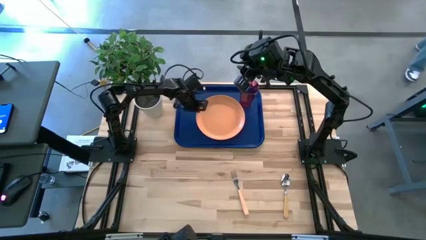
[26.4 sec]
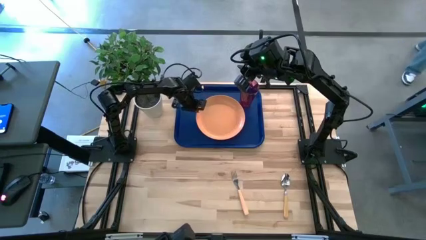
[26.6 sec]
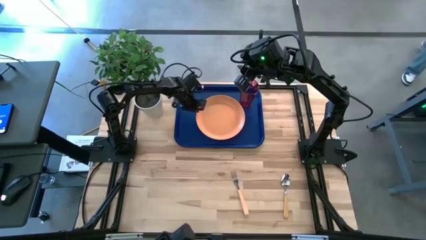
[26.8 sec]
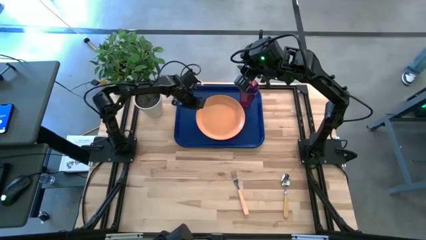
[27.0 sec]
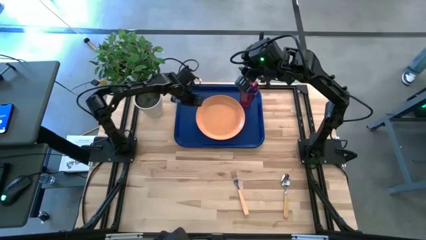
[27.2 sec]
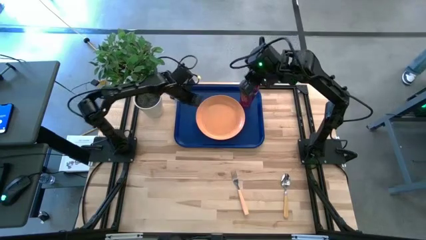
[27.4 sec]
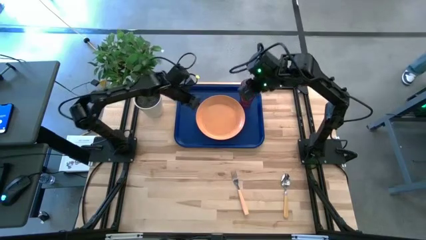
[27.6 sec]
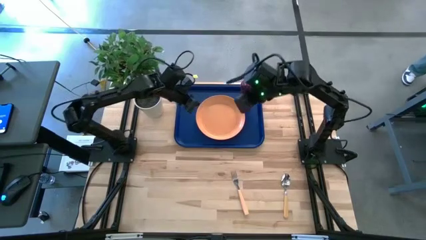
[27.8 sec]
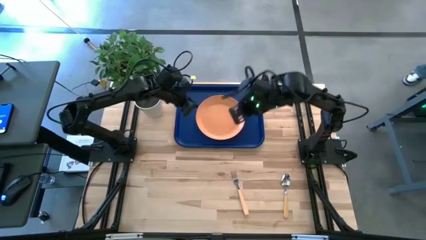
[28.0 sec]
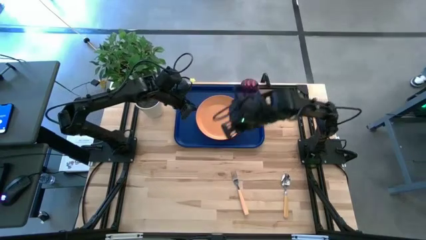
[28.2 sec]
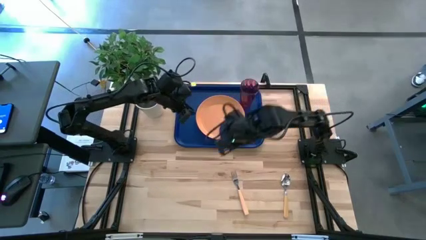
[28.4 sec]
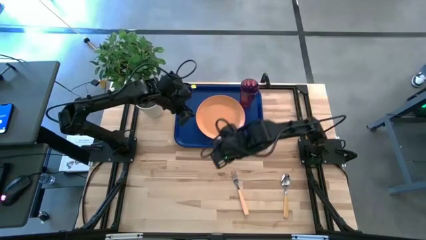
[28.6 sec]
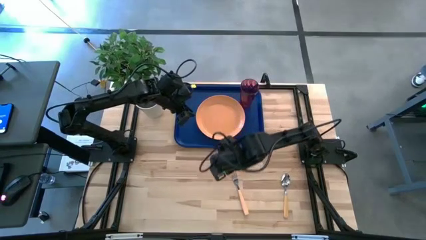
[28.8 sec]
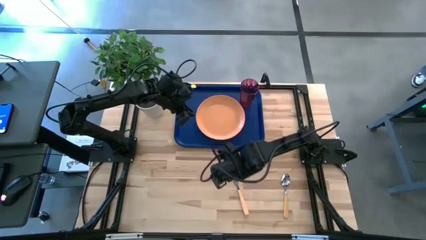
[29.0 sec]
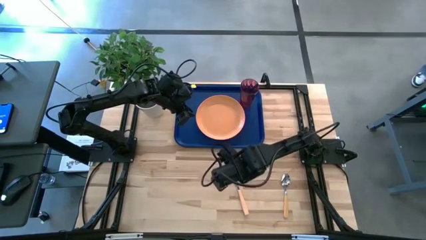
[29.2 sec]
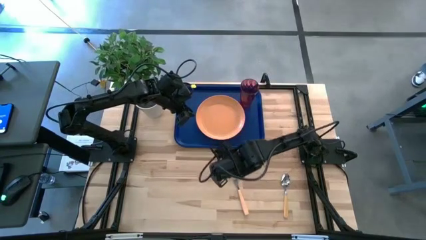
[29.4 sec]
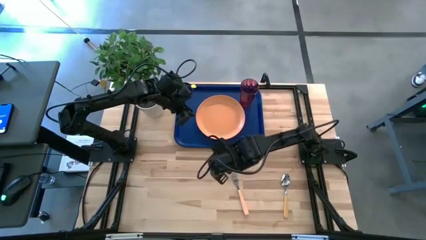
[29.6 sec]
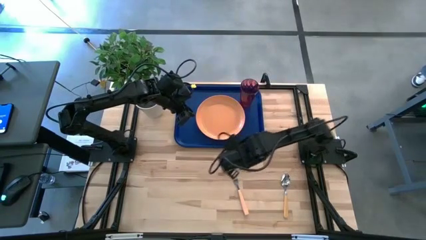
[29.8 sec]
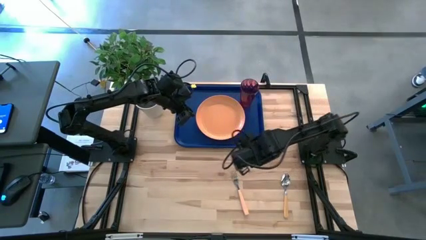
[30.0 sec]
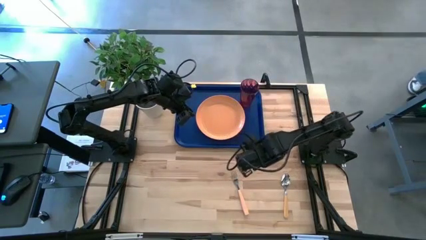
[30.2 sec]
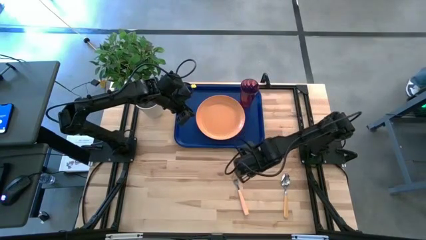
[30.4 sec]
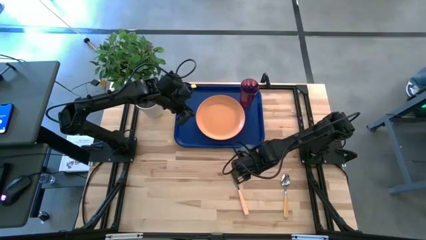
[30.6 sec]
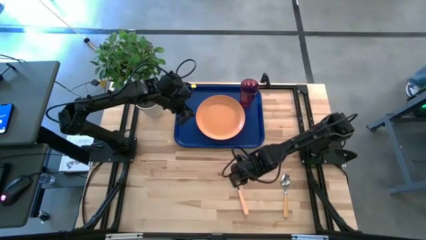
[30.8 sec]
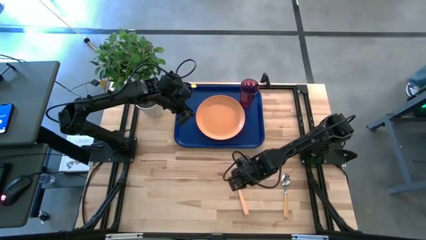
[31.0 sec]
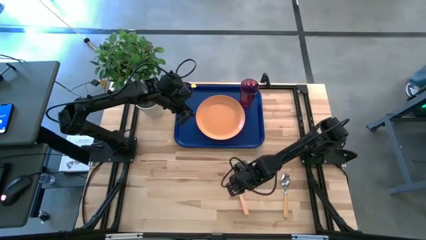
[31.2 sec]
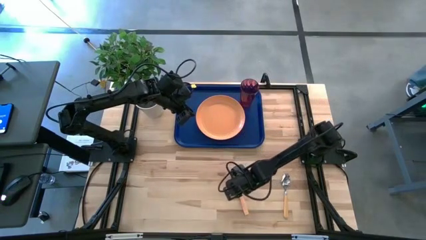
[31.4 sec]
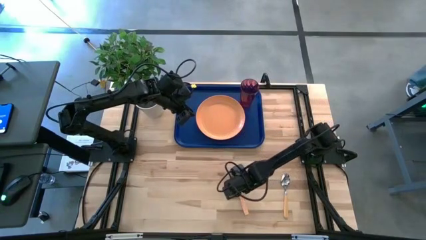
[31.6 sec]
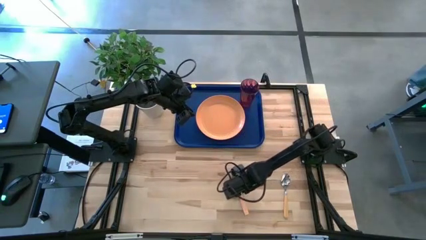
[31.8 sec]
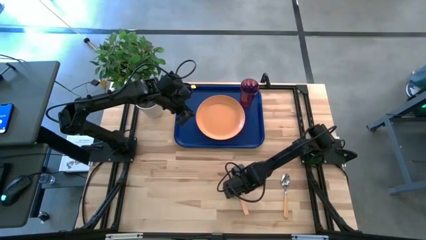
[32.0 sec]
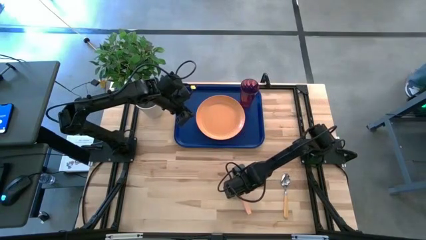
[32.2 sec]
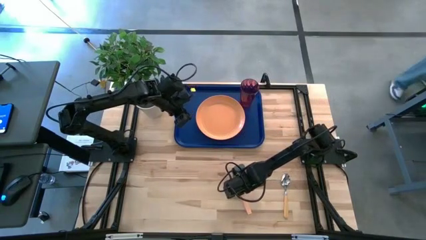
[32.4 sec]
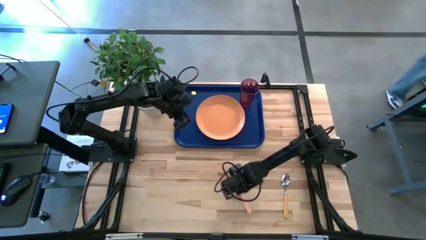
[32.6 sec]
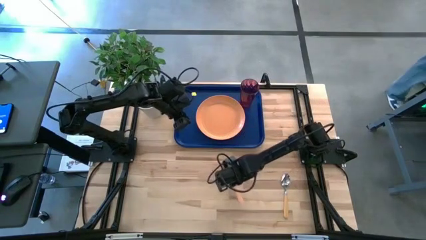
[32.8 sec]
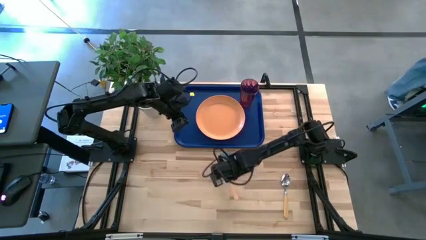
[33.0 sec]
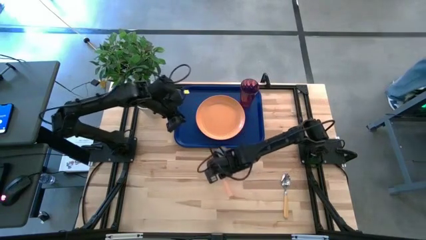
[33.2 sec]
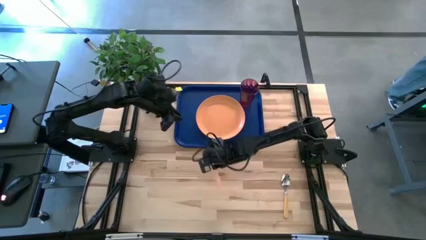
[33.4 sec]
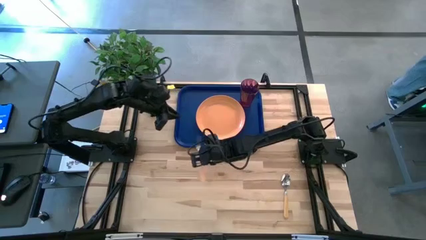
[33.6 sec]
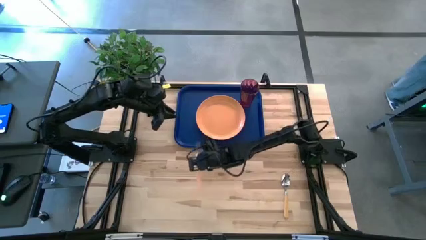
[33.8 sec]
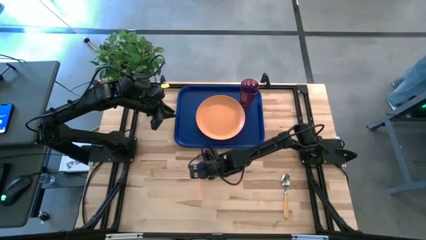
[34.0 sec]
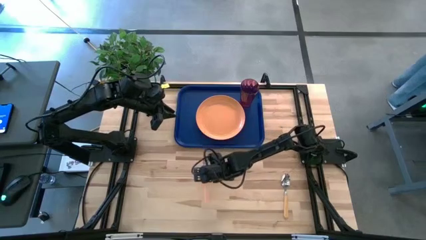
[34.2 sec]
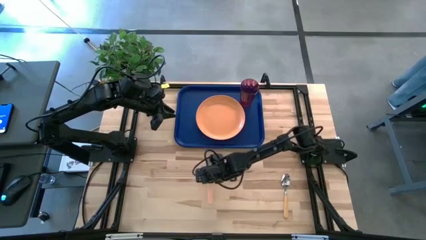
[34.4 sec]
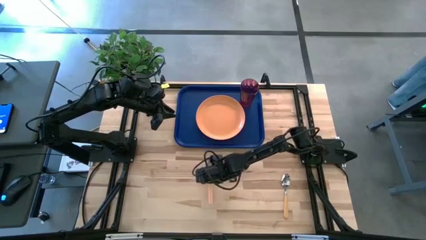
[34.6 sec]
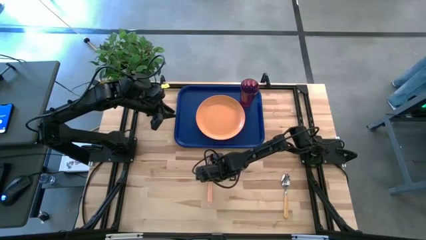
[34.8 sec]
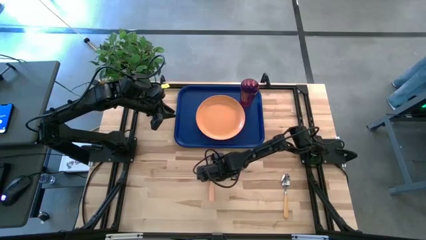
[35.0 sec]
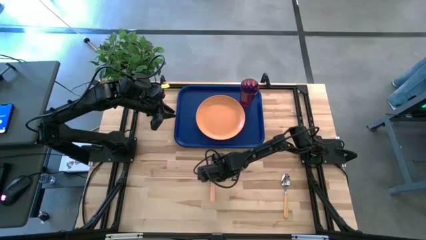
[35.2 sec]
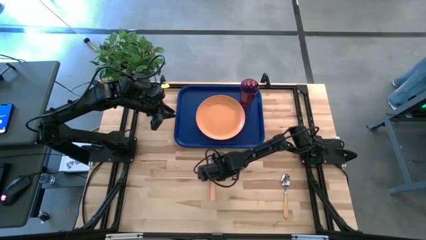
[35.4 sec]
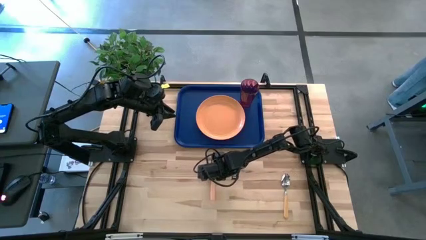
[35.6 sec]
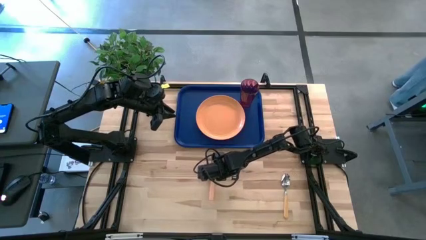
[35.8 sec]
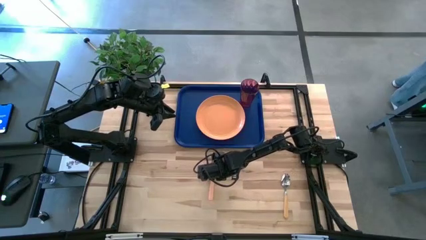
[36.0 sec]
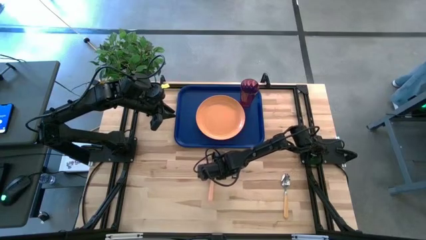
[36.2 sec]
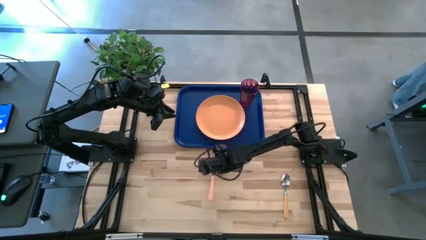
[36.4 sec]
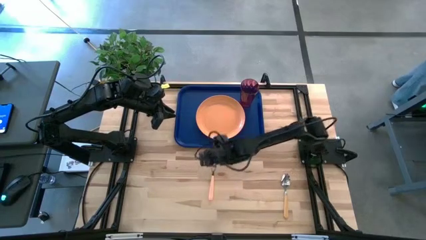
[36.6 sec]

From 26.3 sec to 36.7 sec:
Task: Pick and place plate/cup/fork/spoon on tray
Put the fork on the tray to the left of the plate
